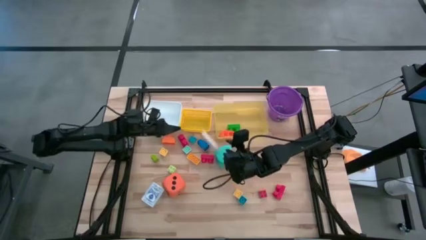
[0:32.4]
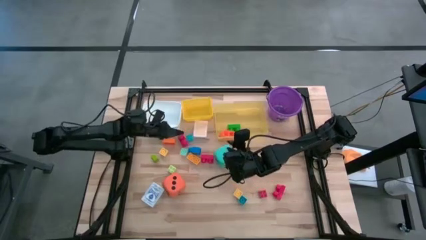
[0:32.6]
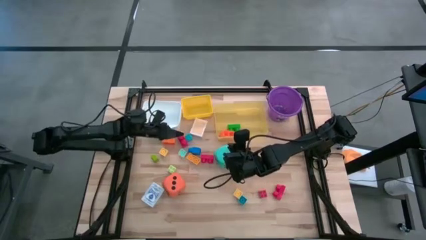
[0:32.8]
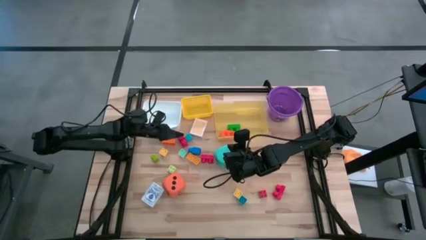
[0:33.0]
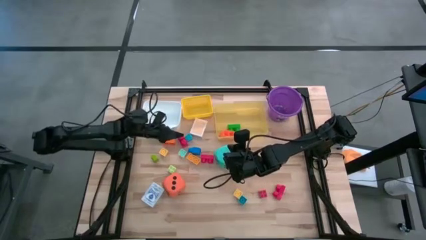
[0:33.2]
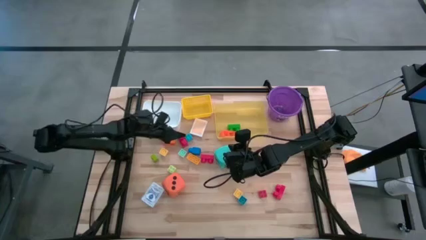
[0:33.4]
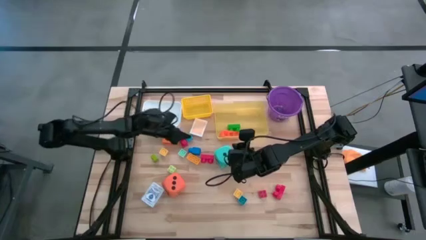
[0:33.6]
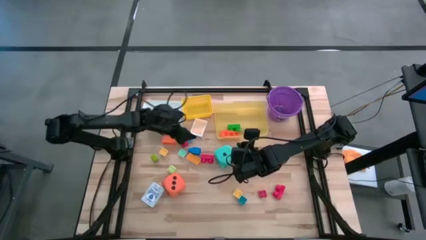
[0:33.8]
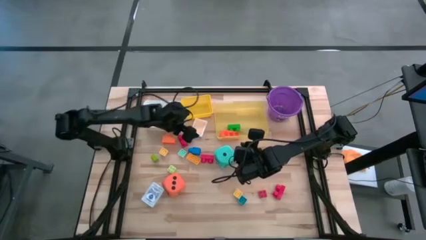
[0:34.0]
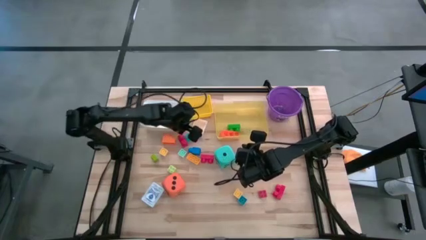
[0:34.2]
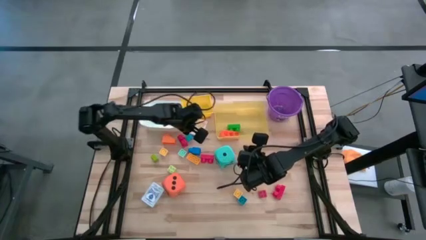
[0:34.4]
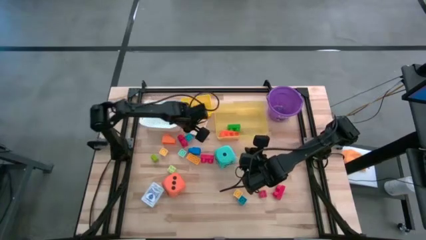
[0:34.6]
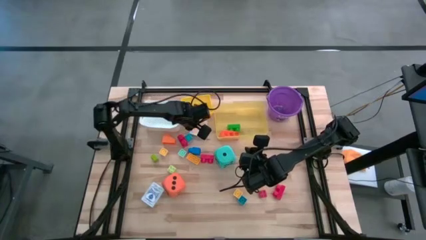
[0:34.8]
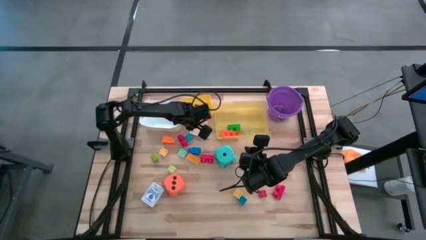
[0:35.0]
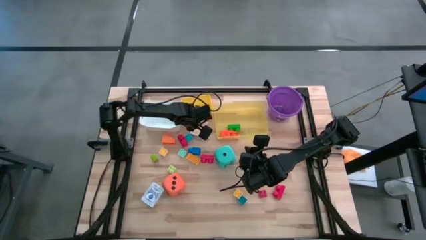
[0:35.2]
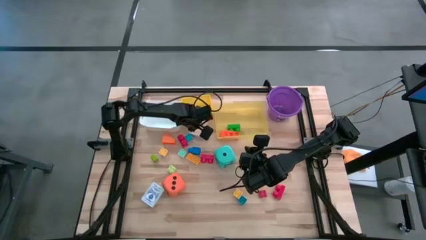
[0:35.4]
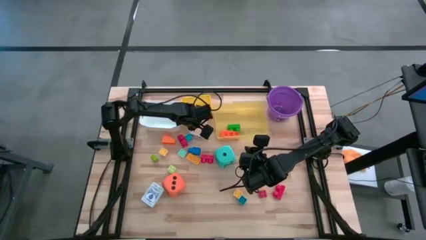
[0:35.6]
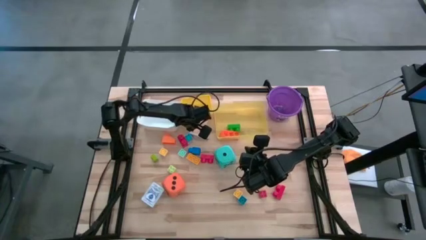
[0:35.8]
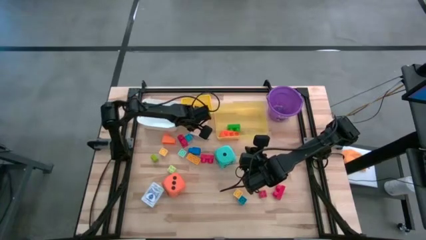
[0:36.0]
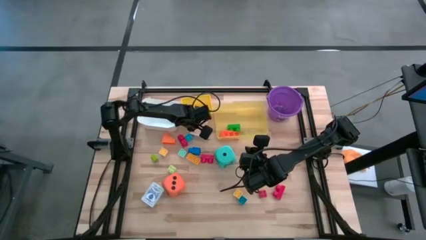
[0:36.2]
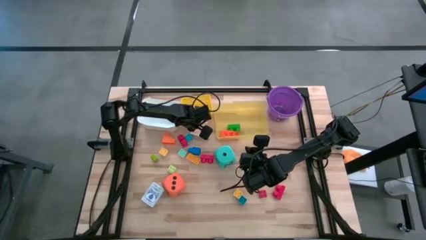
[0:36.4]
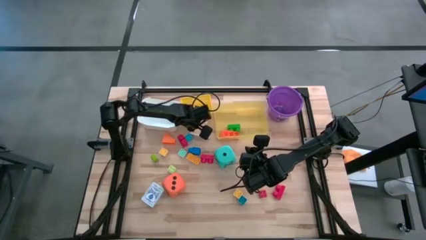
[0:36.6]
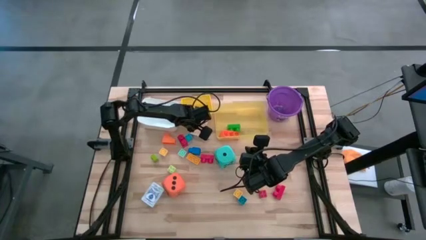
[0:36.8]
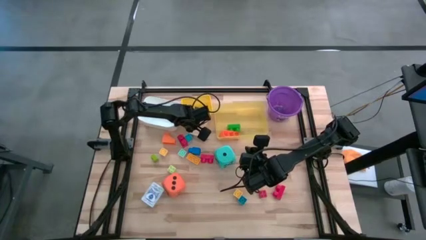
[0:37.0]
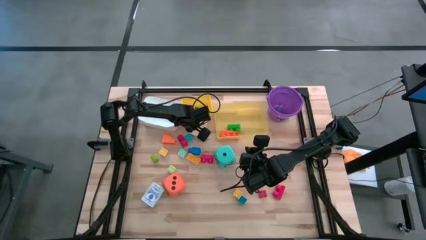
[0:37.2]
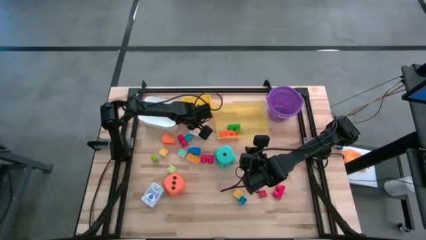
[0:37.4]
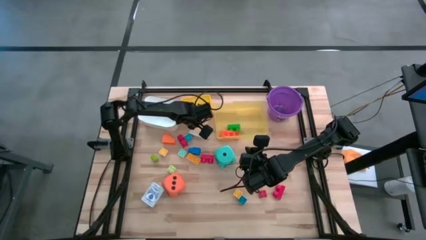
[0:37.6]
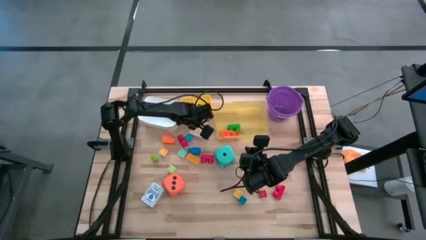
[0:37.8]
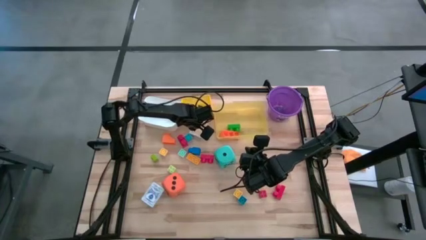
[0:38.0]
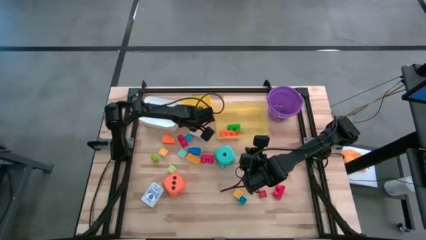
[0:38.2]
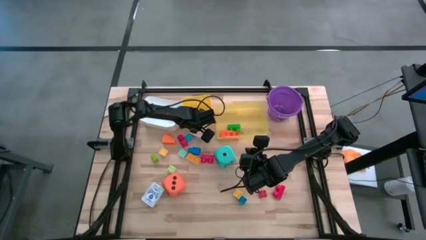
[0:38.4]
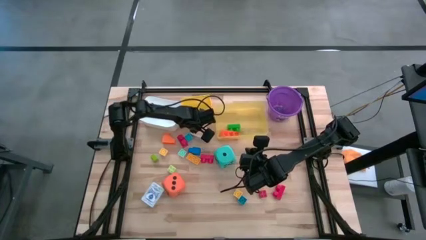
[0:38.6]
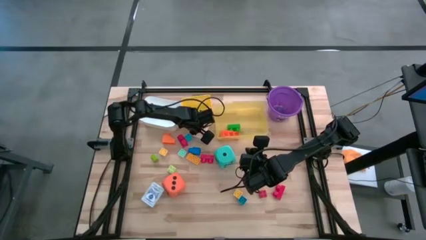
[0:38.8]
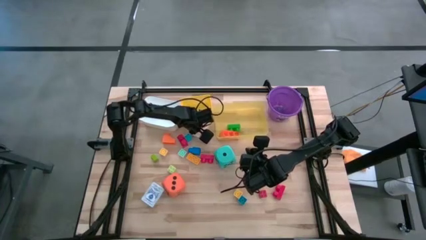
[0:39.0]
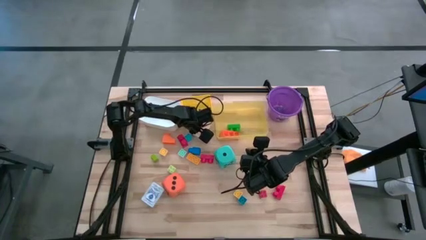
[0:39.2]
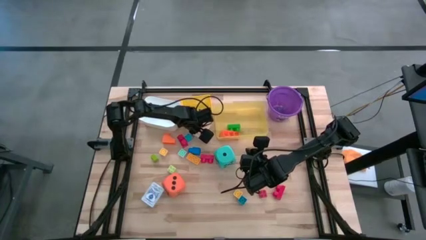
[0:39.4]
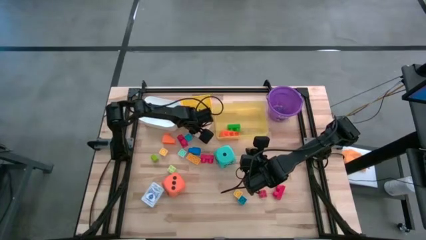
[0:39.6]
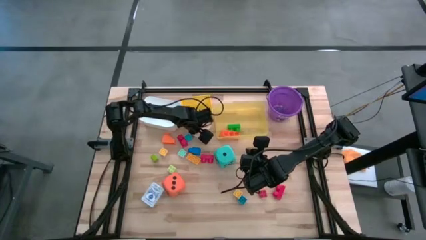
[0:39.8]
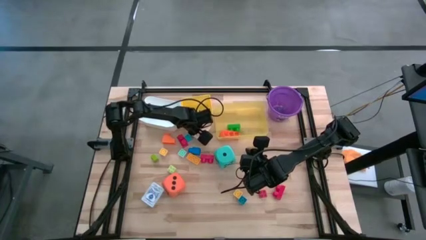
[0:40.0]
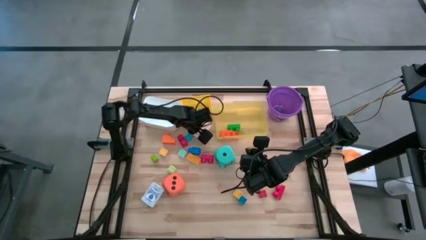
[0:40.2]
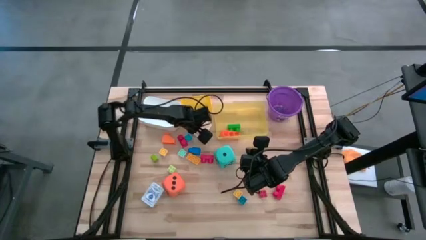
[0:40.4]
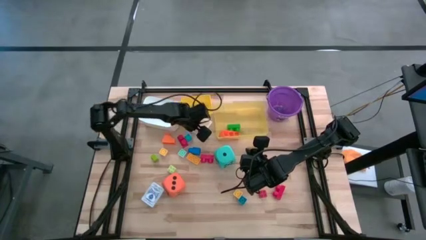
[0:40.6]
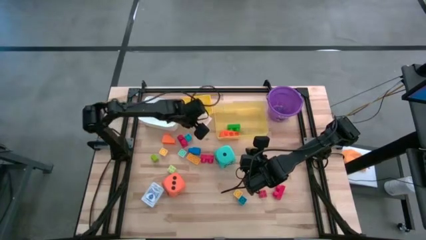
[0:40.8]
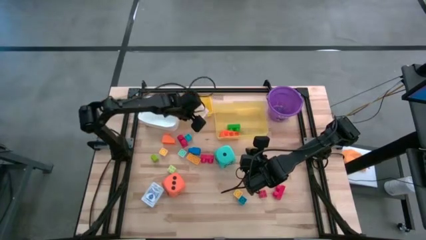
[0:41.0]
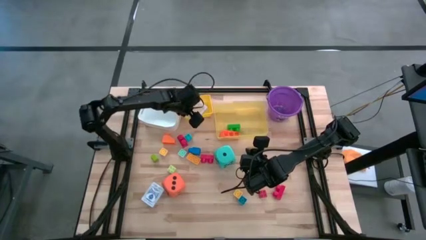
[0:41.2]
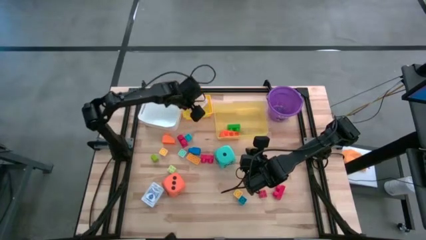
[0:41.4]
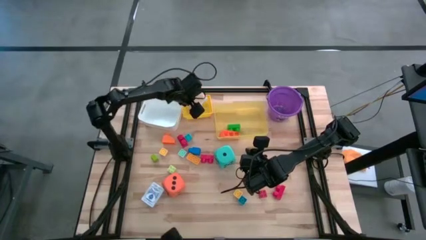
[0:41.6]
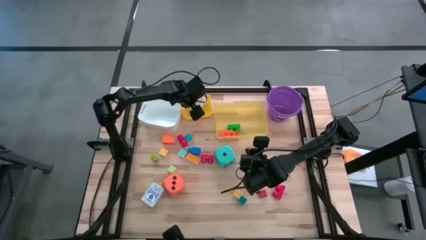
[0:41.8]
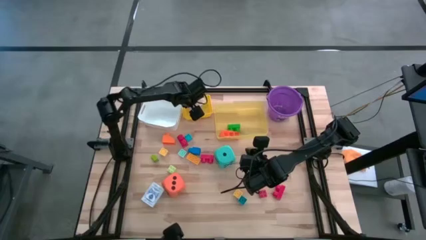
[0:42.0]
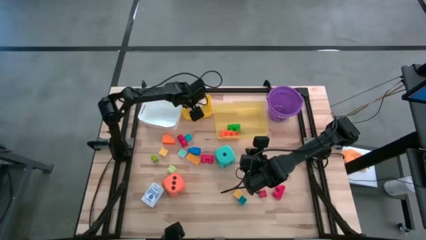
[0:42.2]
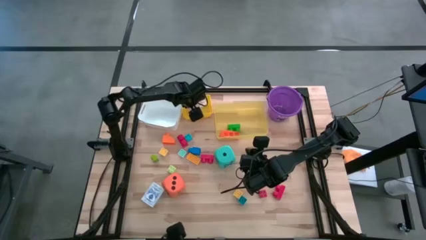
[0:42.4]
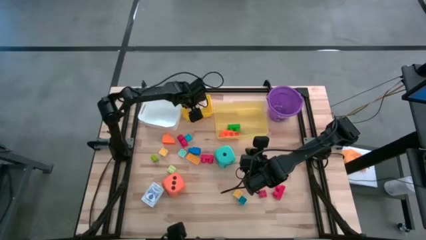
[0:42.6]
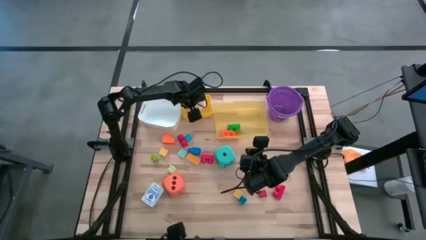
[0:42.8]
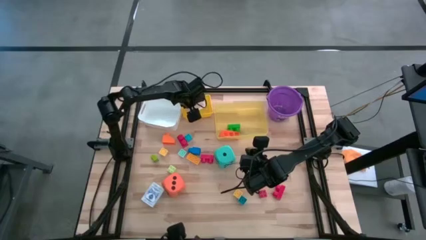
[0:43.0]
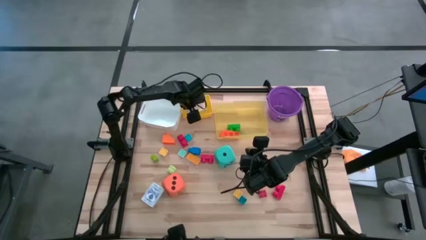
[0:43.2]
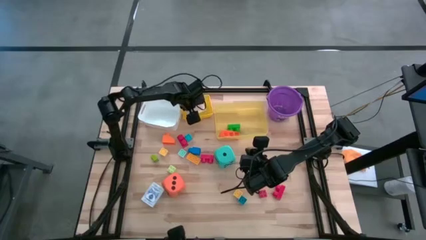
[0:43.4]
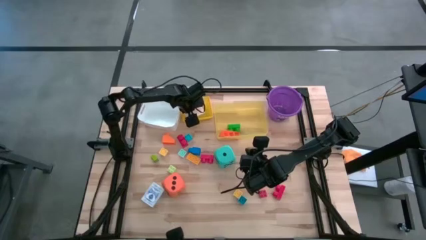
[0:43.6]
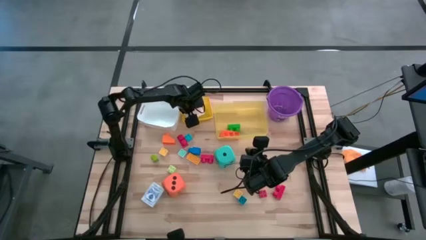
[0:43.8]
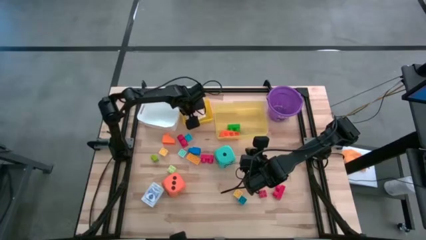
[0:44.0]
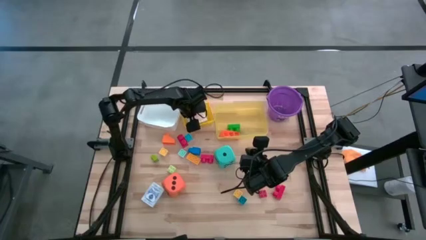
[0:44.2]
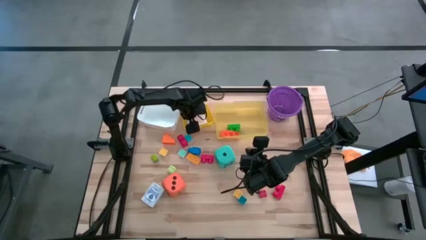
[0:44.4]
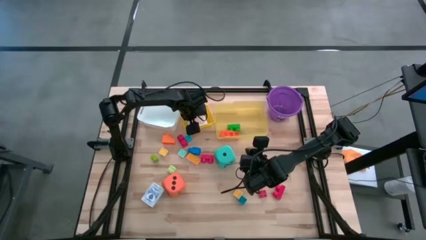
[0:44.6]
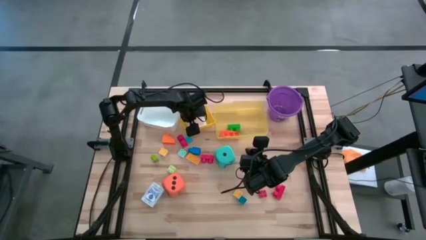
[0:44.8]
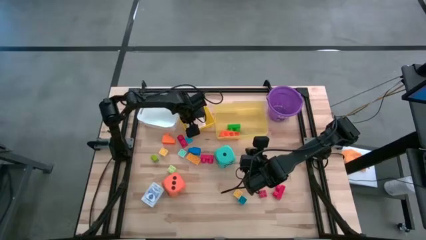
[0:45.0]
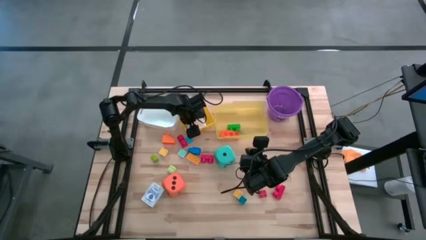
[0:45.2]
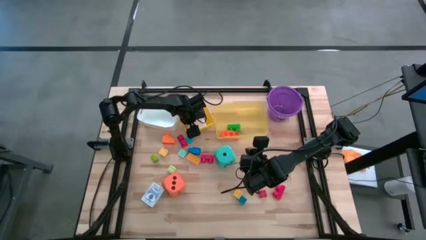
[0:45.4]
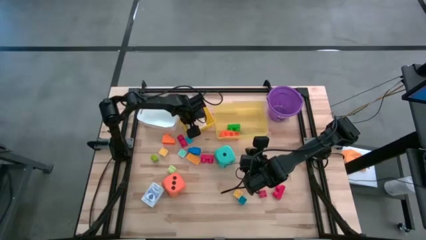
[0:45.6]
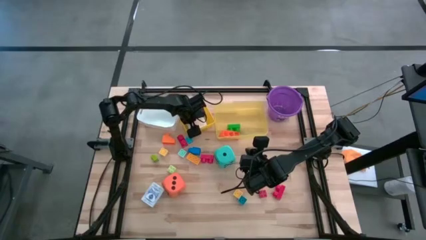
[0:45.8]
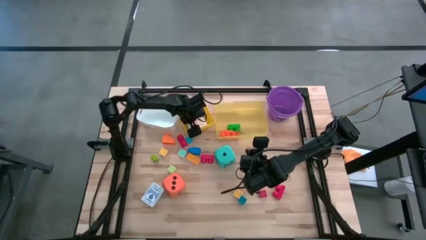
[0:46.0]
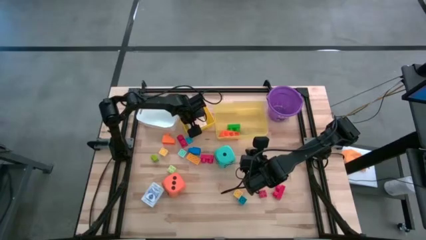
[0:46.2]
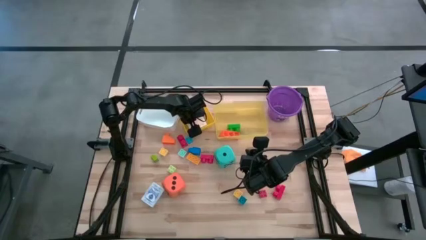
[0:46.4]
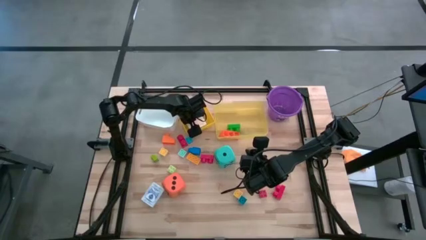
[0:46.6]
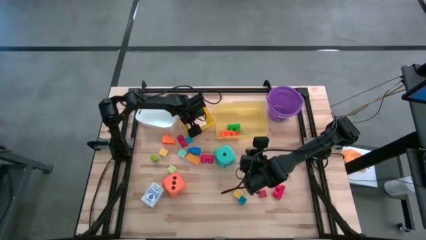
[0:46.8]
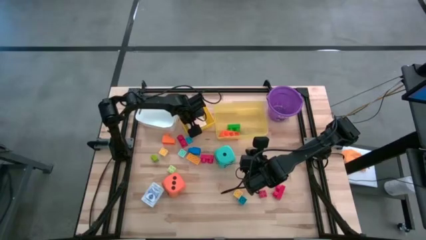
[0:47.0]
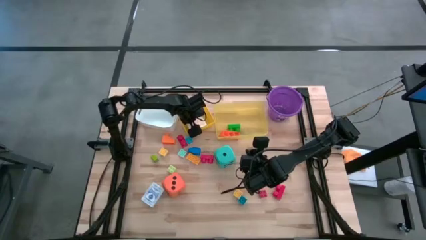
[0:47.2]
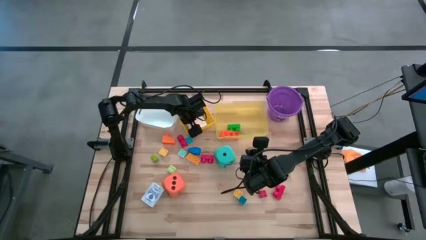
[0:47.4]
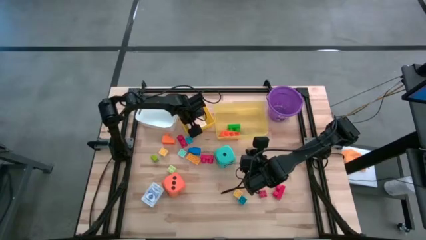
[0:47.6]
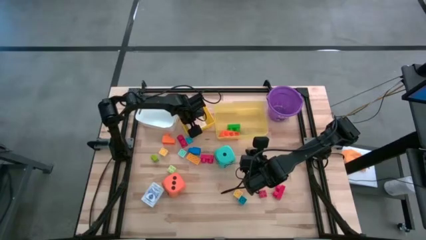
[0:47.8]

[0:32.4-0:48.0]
Task: Pick & Place Toys
Put the yellow deck of cards into the yellow basket

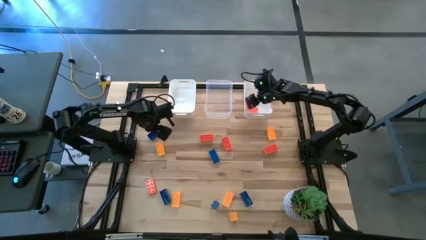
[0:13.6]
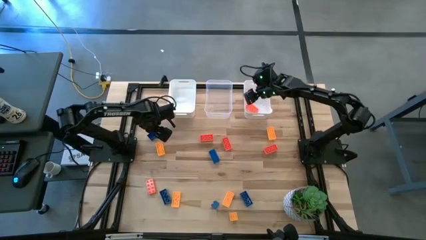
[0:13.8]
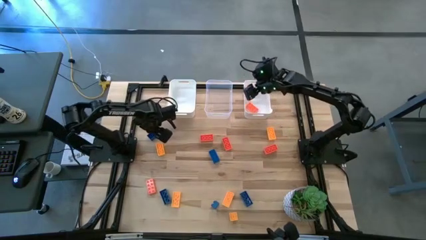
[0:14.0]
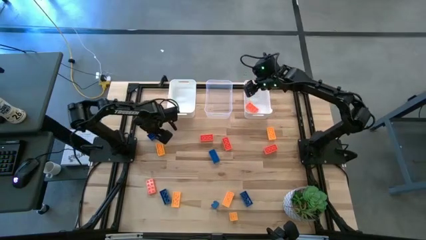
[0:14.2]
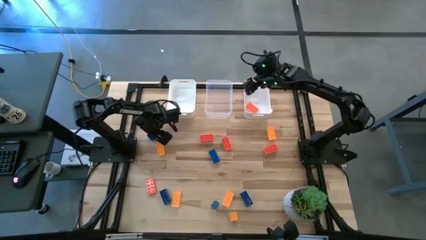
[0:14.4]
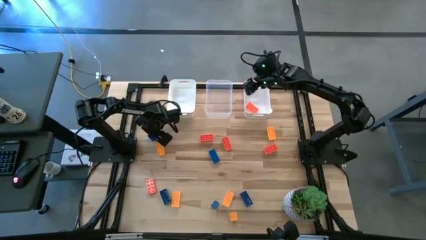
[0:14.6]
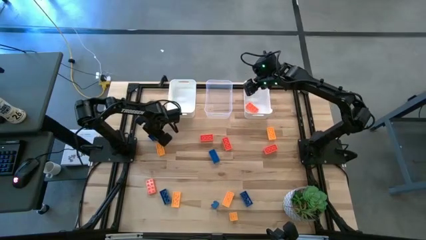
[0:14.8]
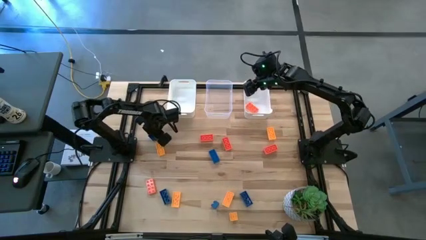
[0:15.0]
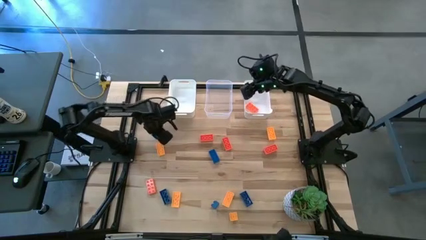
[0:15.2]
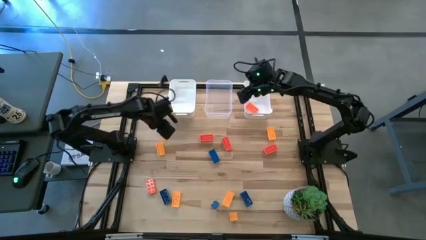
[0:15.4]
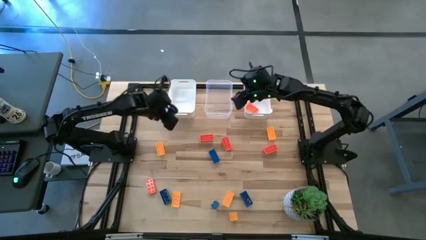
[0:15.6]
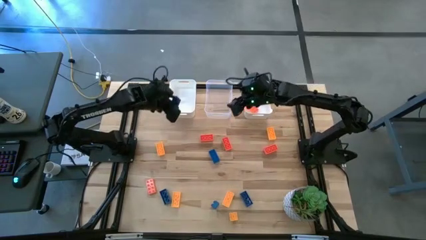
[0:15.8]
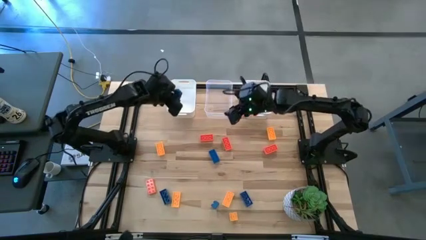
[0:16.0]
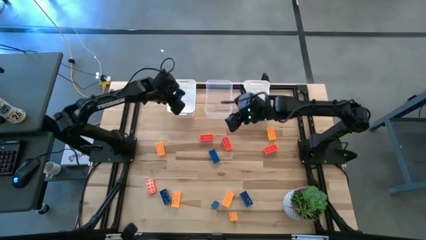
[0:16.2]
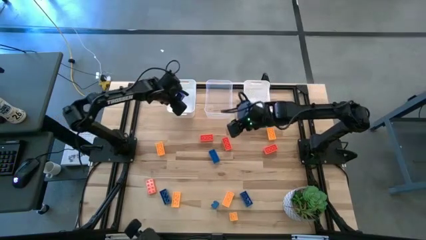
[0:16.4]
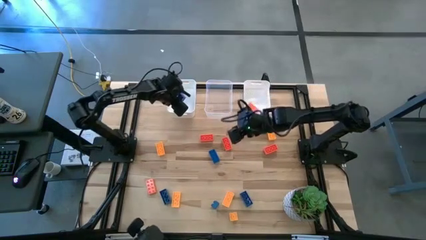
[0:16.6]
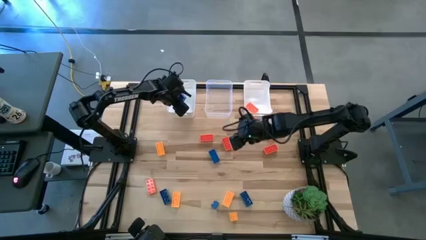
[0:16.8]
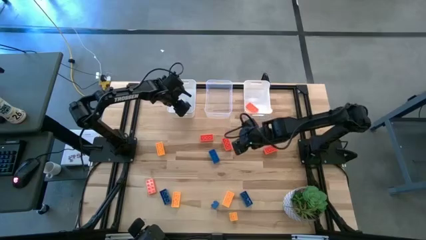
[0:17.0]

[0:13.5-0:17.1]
Task: Sort & place blocks by color
Put the blue game piece into the left white bin
